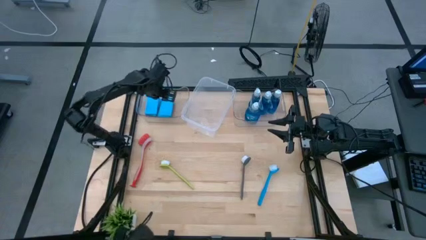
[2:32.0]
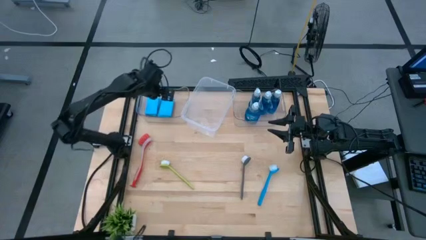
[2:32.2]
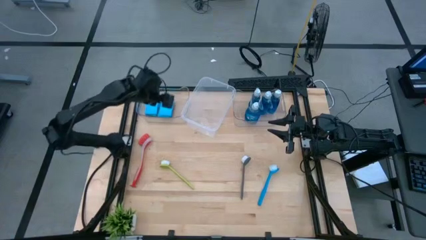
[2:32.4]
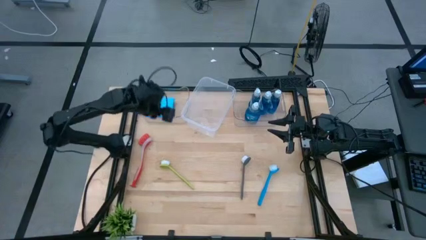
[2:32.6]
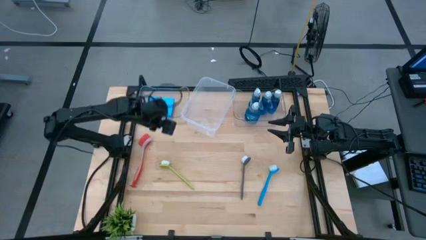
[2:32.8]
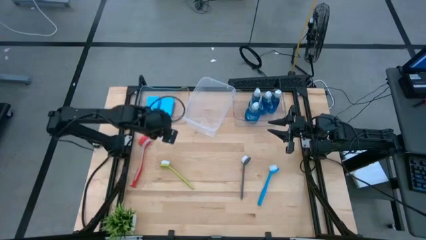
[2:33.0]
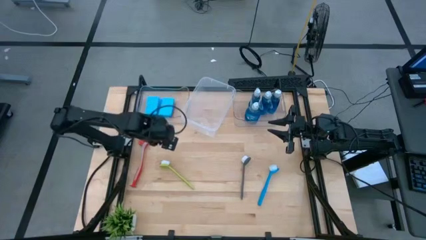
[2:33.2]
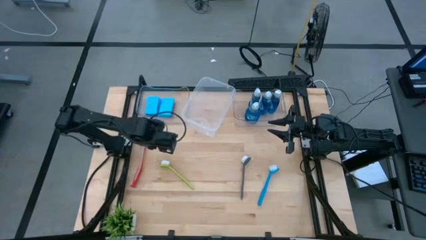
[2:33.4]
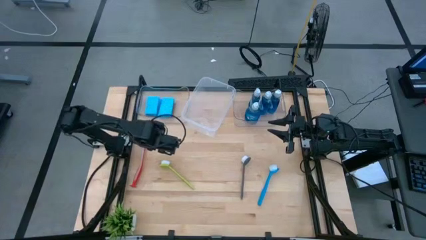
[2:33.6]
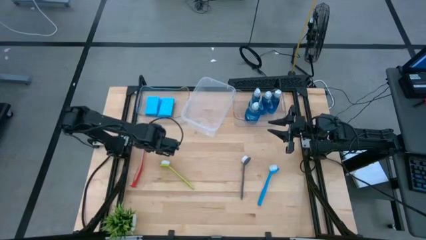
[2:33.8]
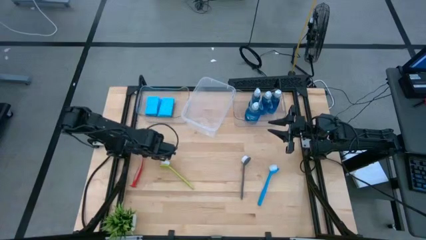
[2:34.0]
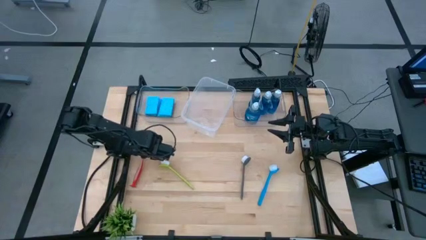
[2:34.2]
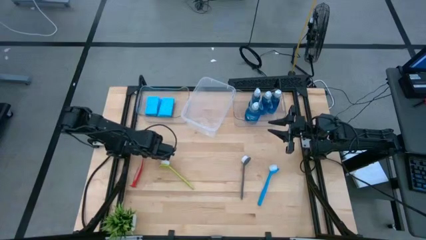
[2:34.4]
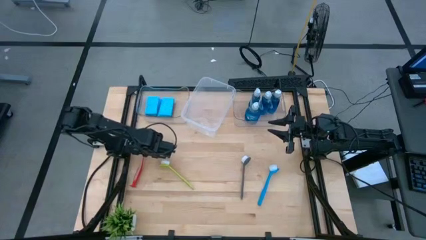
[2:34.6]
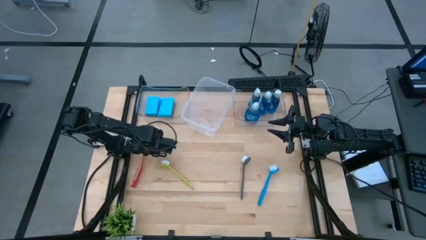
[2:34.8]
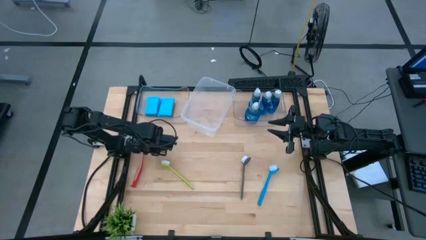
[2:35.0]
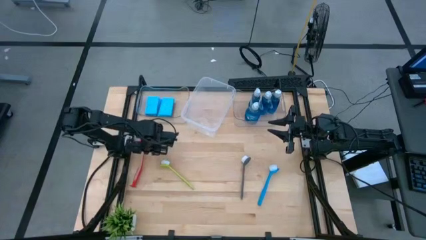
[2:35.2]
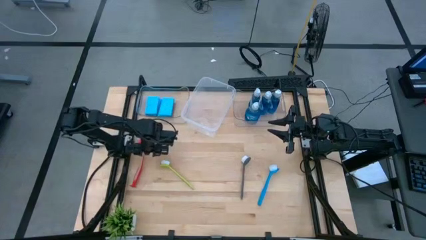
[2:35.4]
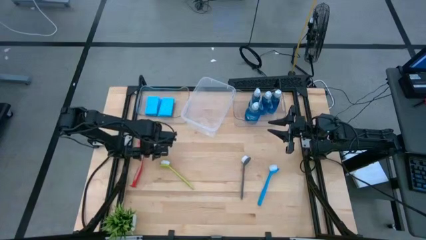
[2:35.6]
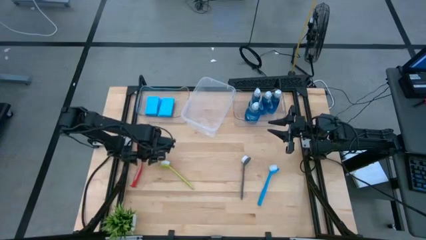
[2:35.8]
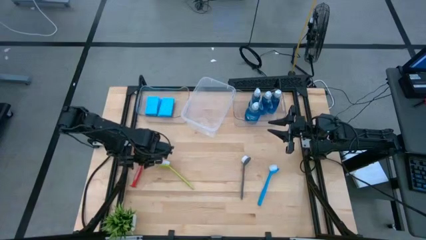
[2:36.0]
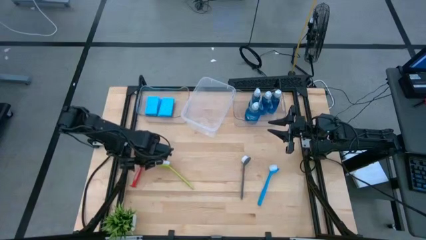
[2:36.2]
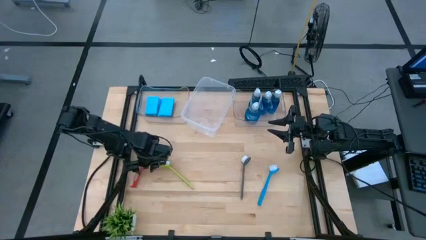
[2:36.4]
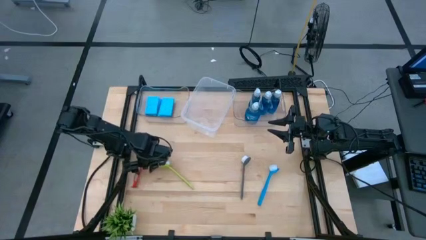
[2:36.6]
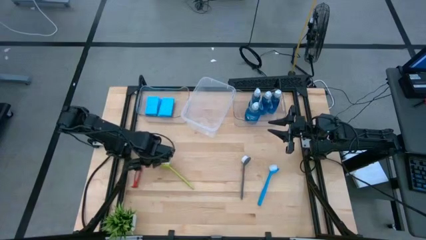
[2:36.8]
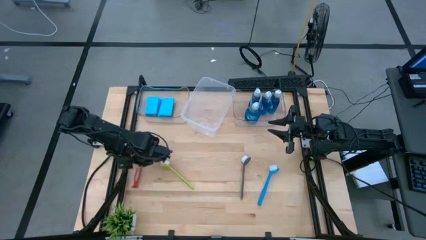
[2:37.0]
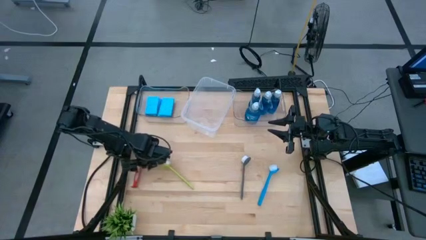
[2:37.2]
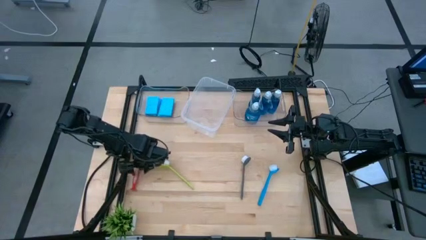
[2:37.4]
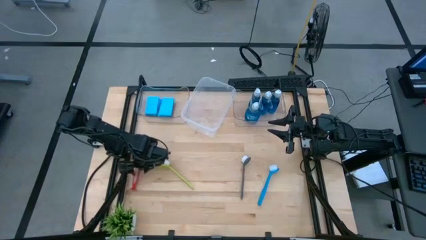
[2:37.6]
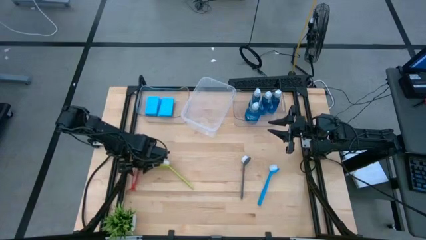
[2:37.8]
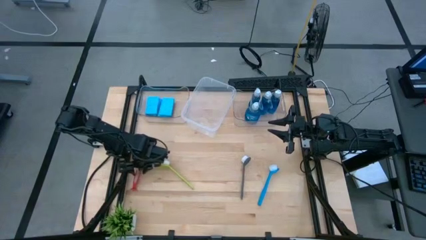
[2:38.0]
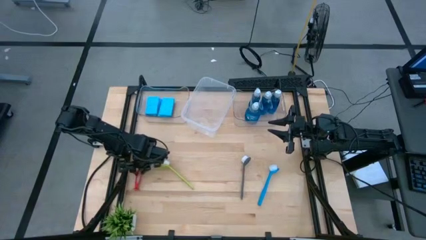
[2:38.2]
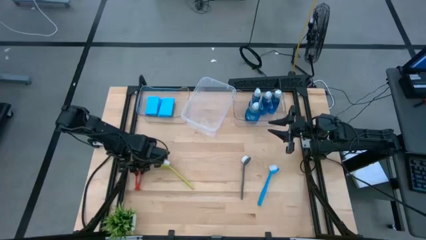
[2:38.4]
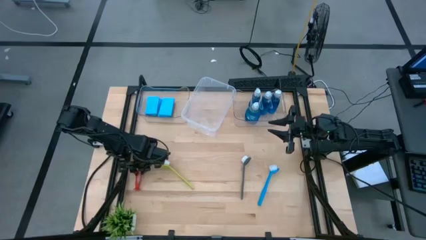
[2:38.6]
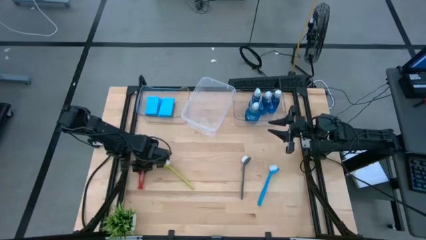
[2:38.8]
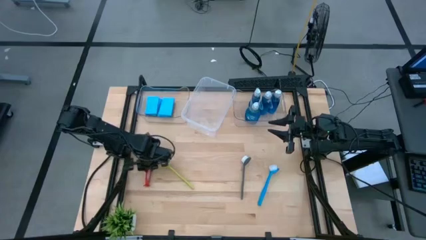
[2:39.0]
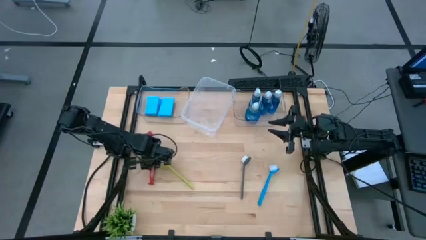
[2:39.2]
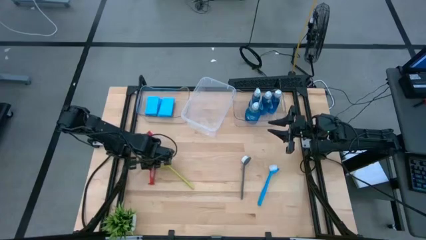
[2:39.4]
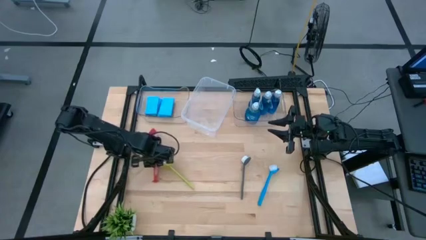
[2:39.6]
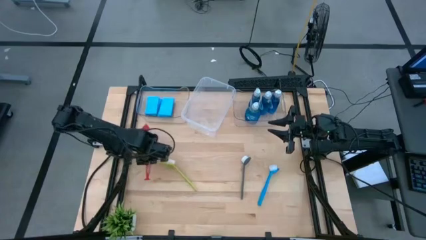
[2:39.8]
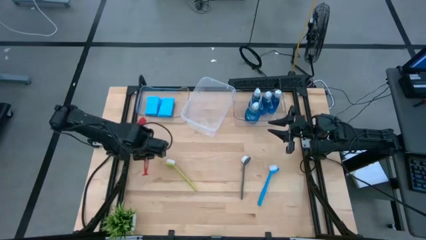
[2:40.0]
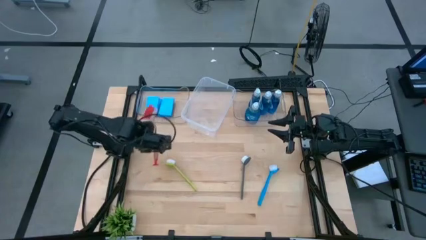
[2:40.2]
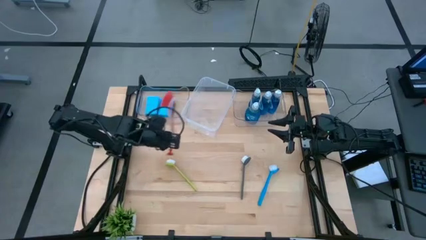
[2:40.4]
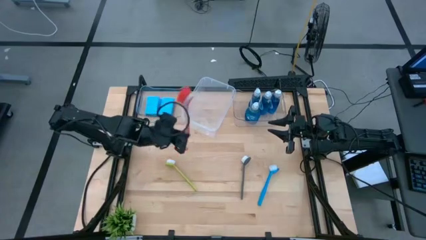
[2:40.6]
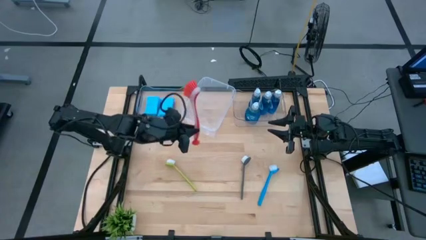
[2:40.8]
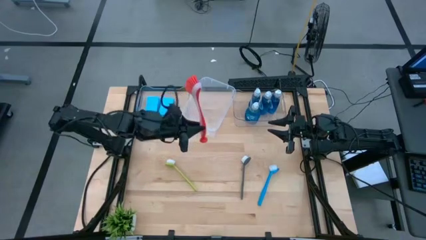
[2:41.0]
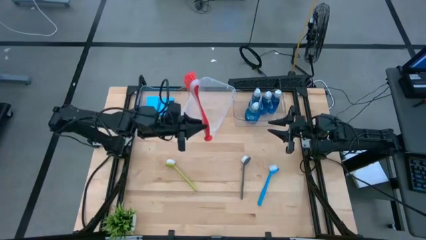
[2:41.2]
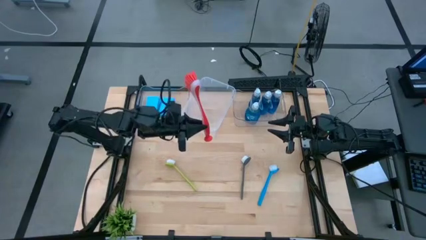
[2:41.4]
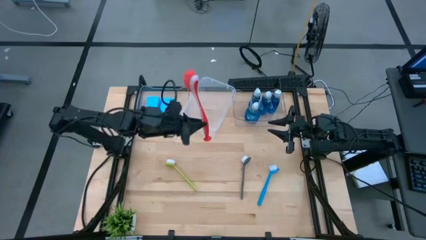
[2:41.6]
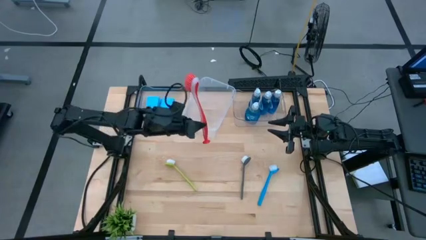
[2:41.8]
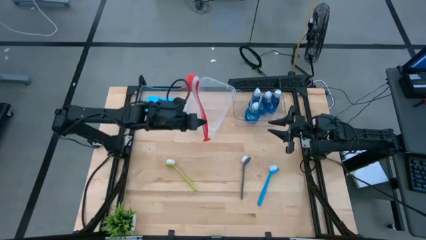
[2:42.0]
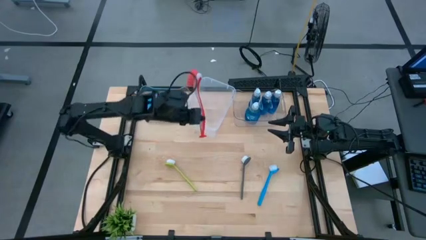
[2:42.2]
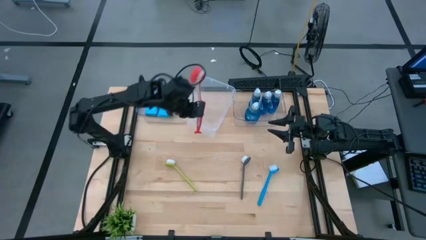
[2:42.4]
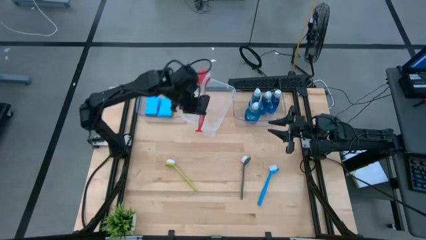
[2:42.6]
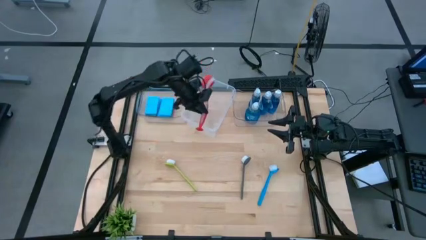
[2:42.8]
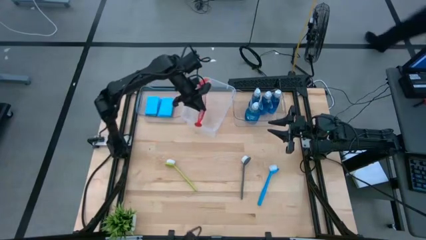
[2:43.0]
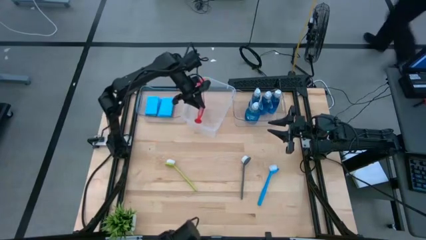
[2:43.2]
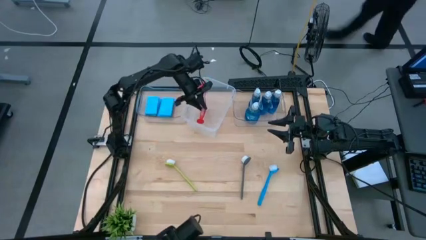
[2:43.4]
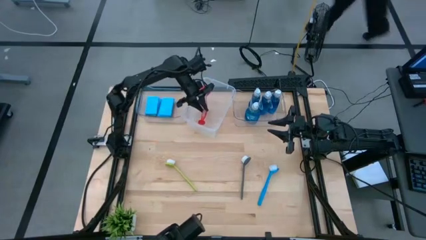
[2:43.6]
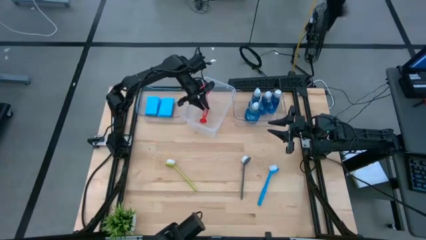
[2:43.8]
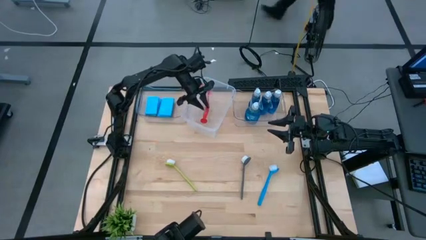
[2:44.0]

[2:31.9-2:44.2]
Task: Pick & Place Kitchen Sink Supplies
Put the red dish brush into the middle transparent bin

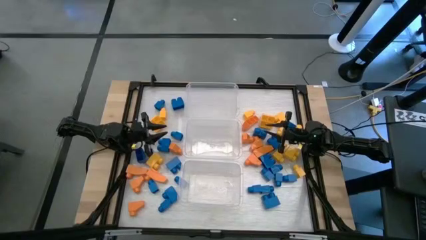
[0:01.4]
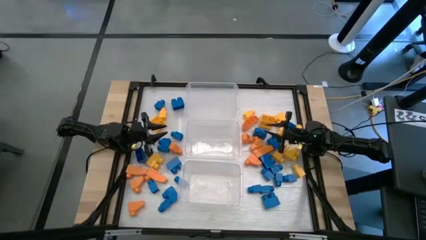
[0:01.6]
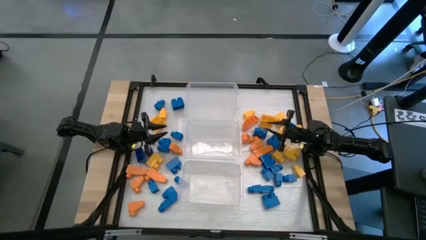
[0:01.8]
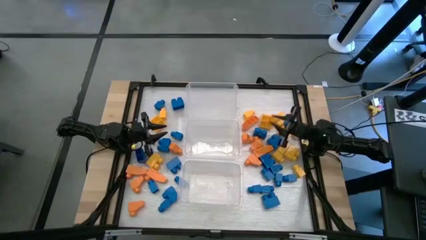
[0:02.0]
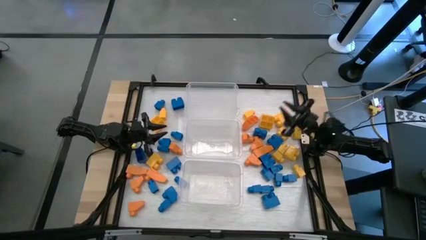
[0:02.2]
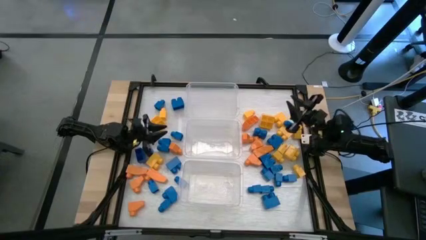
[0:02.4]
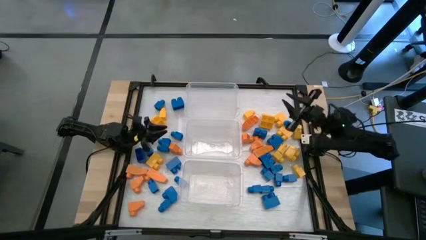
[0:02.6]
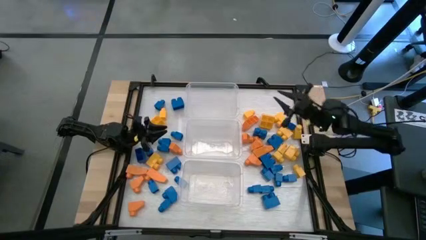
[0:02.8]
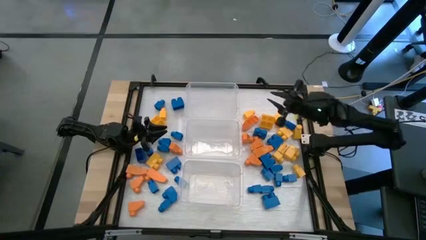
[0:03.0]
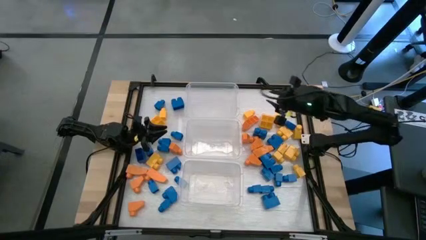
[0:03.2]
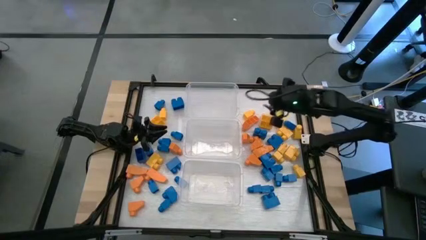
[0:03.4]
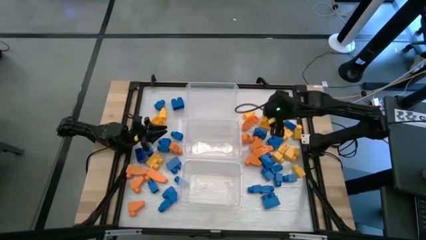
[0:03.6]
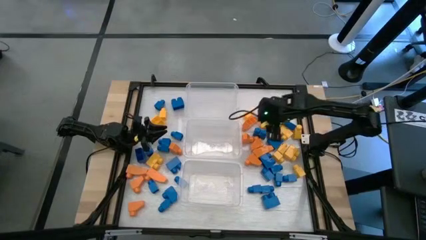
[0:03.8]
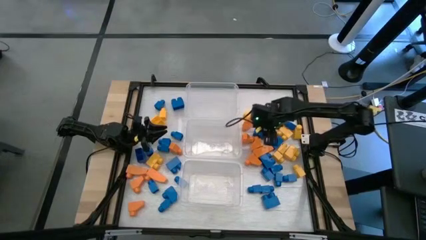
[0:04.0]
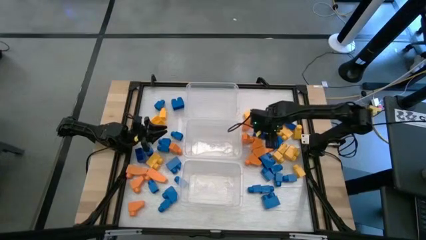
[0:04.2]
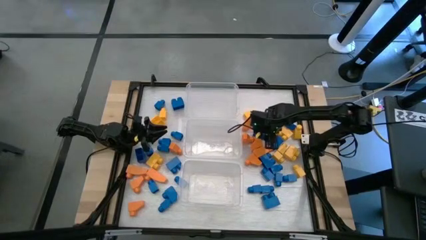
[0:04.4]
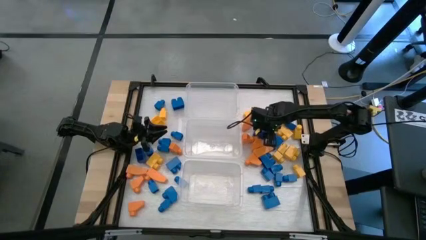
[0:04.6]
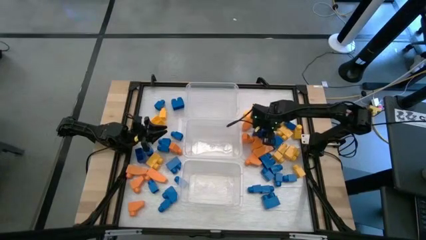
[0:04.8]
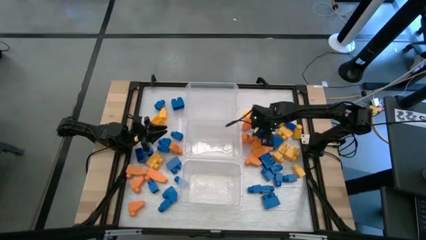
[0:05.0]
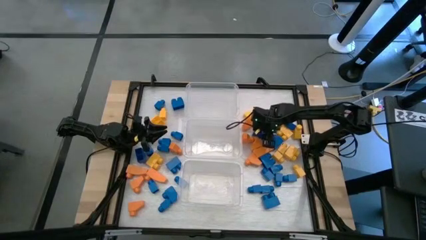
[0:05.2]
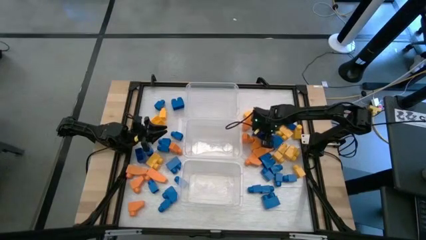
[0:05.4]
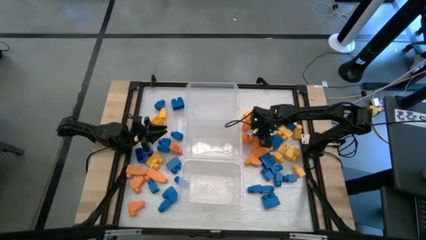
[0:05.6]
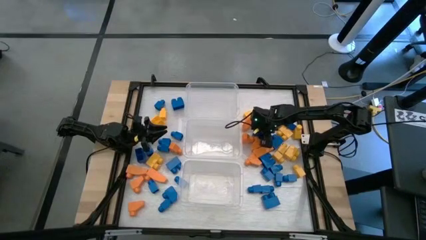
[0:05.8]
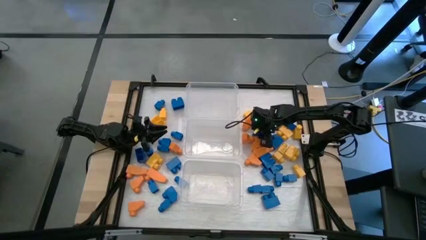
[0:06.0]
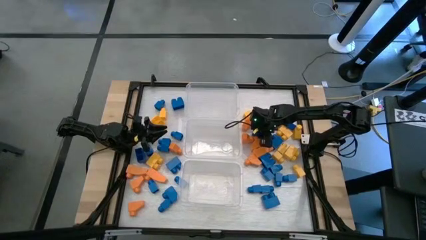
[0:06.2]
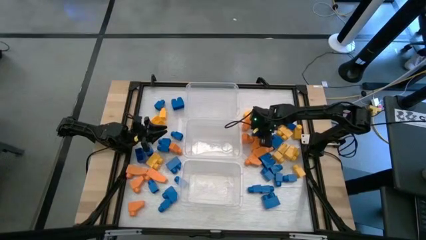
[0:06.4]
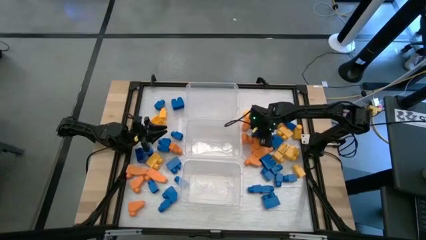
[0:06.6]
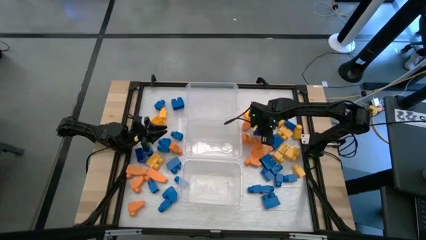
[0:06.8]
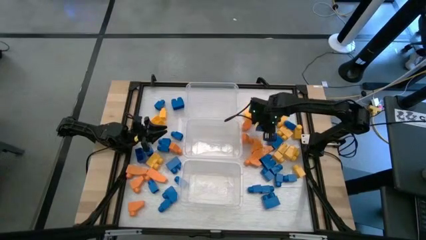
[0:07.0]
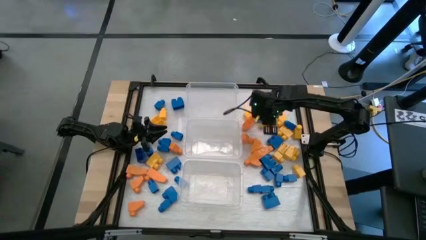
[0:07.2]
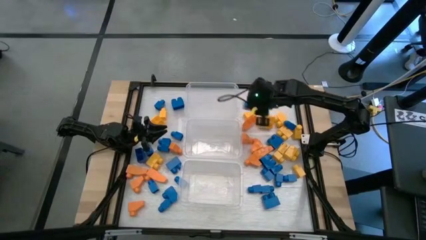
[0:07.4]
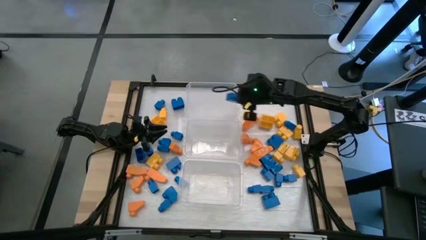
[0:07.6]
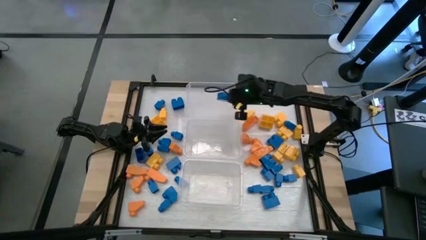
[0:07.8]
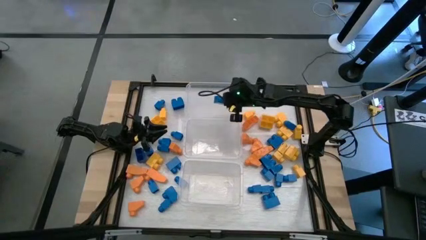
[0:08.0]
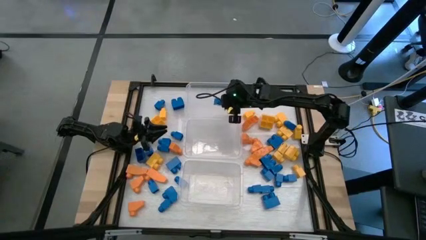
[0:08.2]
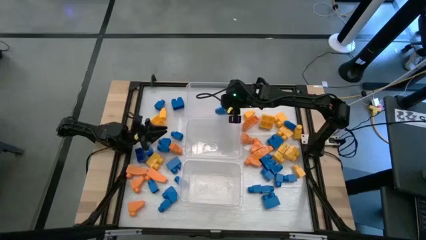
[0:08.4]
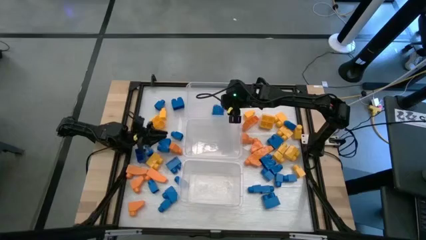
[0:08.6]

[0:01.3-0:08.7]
Task: Sort blocks
Put the blue game piece into the middle transparent bin
